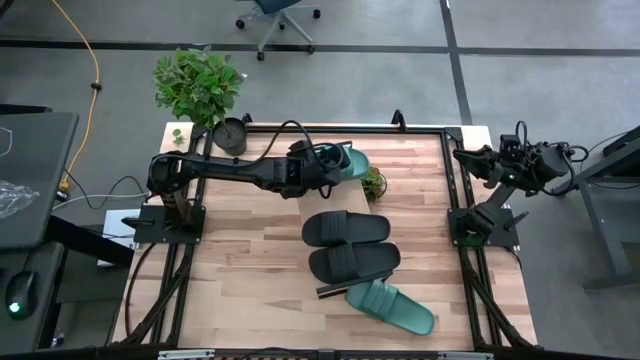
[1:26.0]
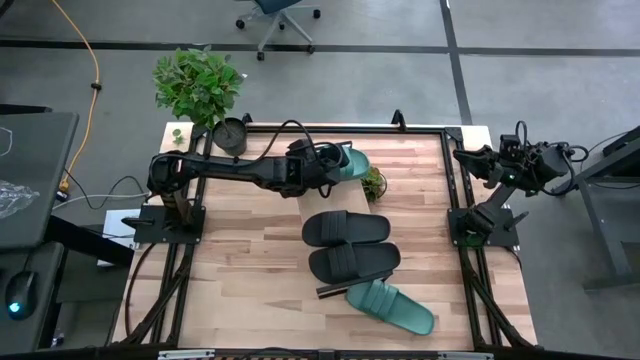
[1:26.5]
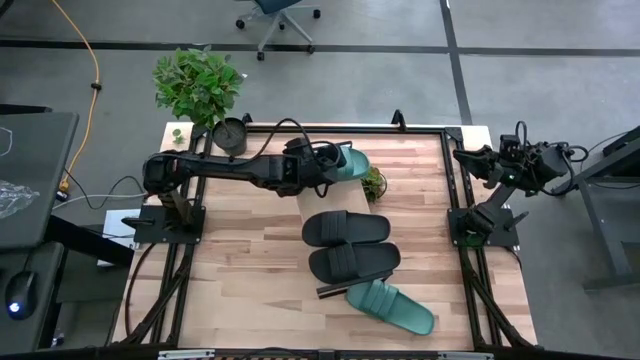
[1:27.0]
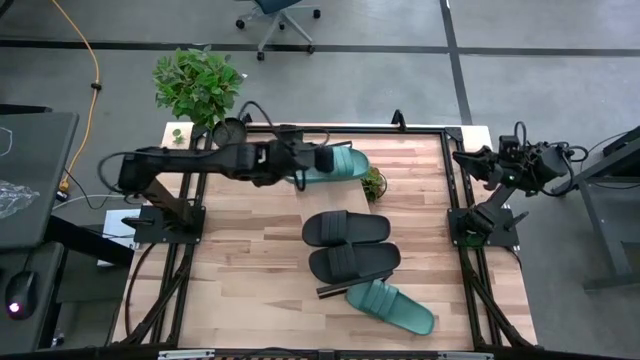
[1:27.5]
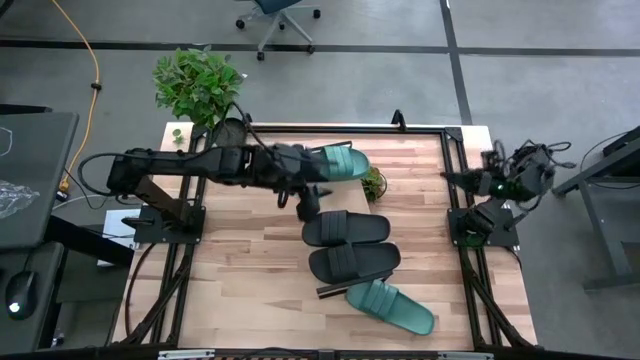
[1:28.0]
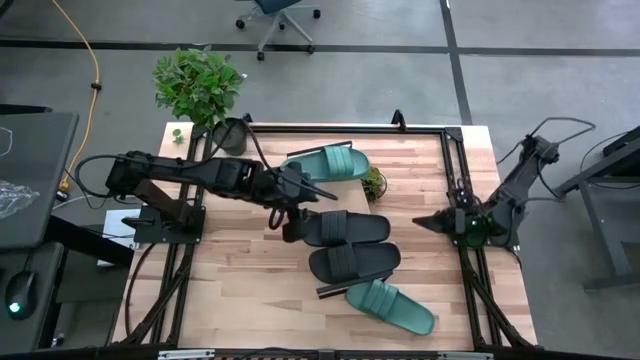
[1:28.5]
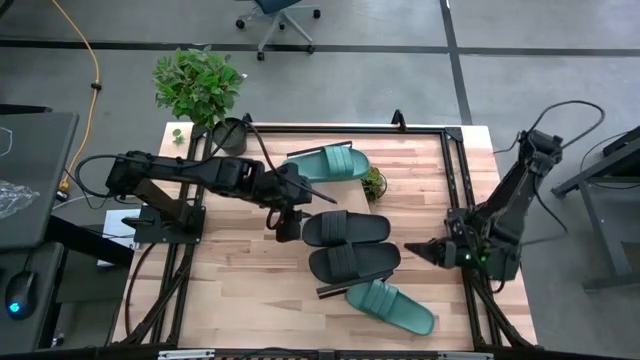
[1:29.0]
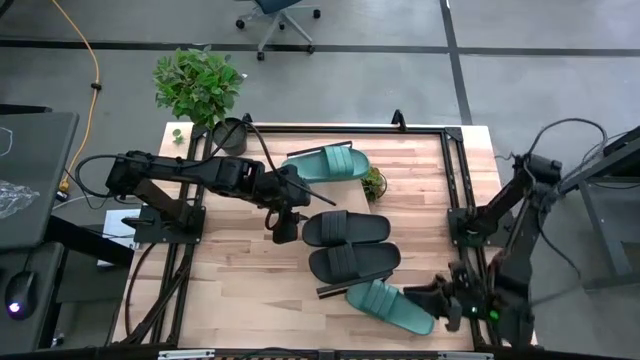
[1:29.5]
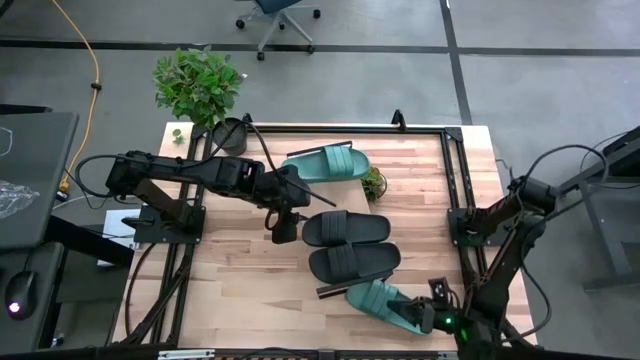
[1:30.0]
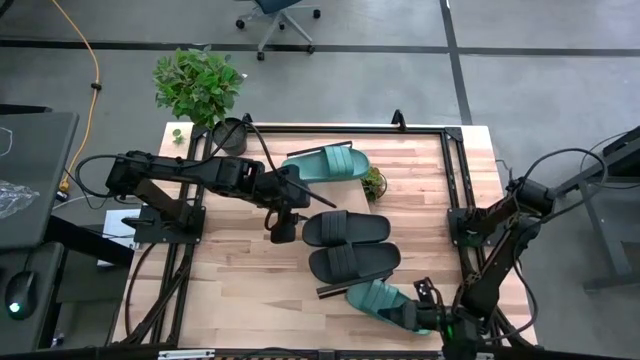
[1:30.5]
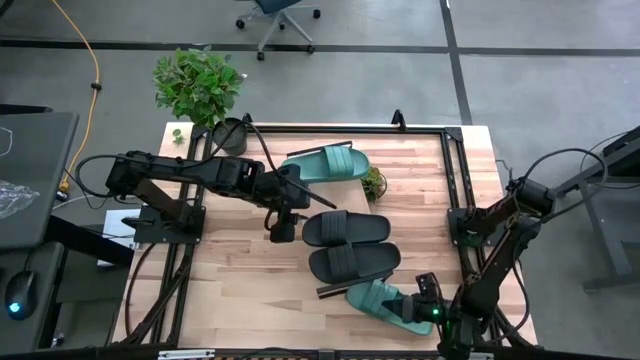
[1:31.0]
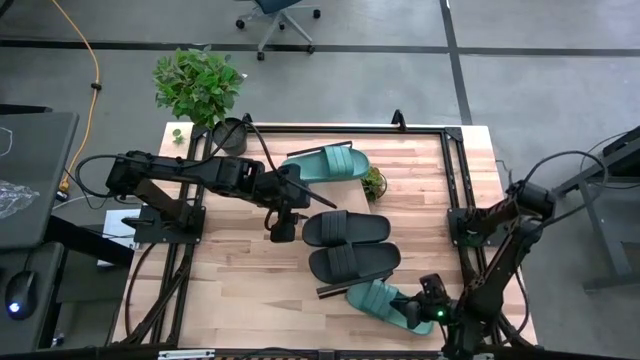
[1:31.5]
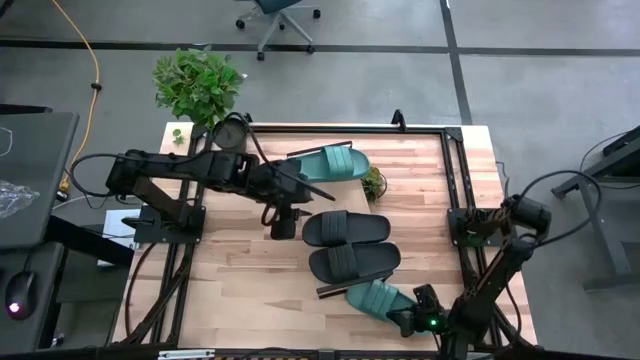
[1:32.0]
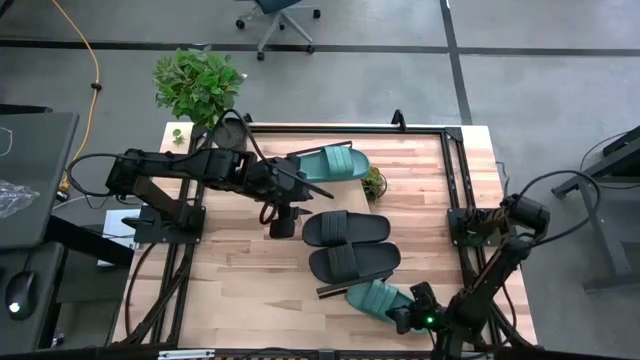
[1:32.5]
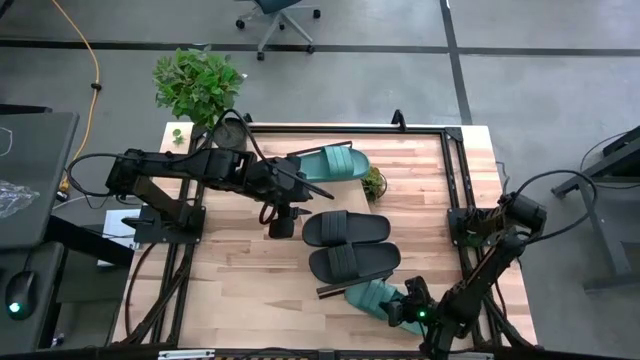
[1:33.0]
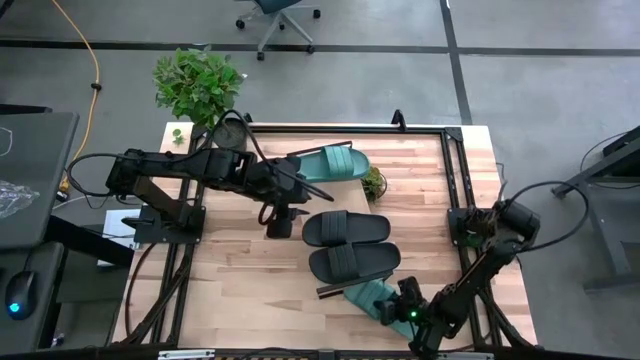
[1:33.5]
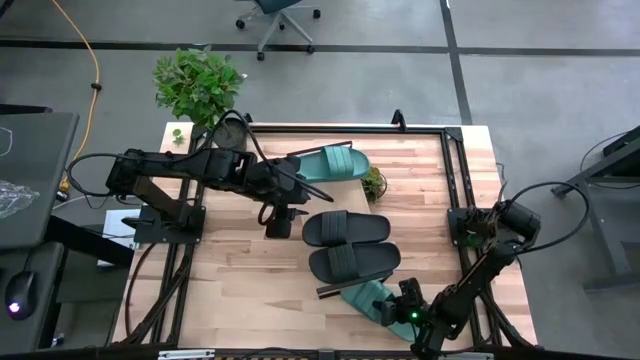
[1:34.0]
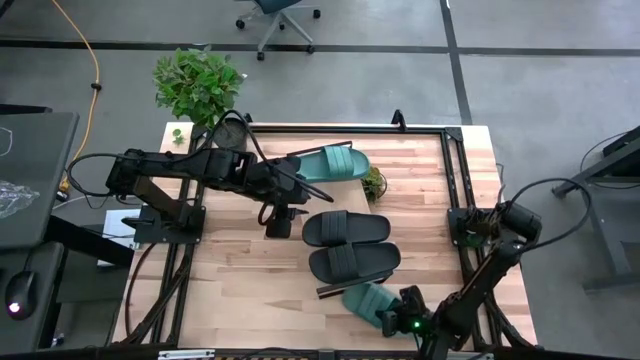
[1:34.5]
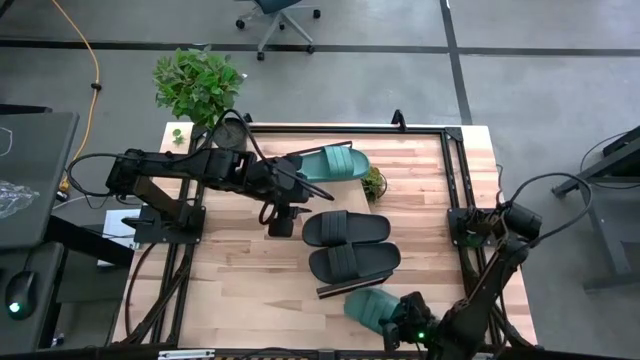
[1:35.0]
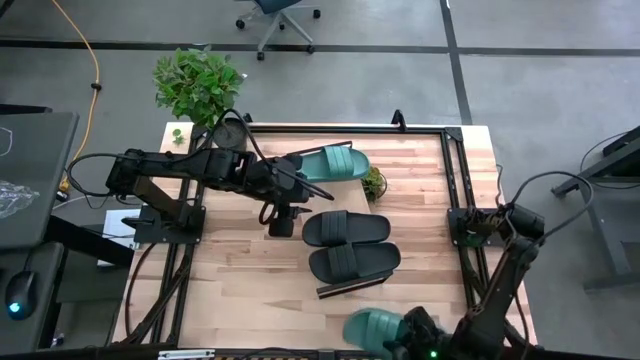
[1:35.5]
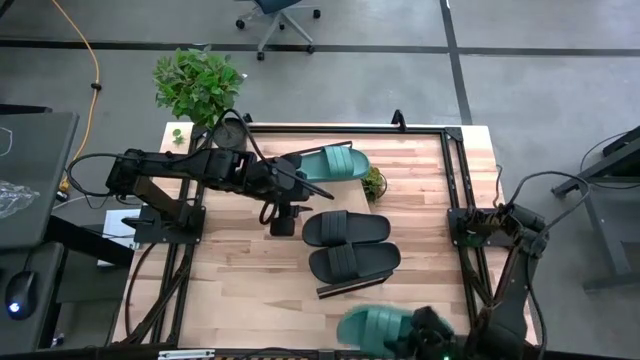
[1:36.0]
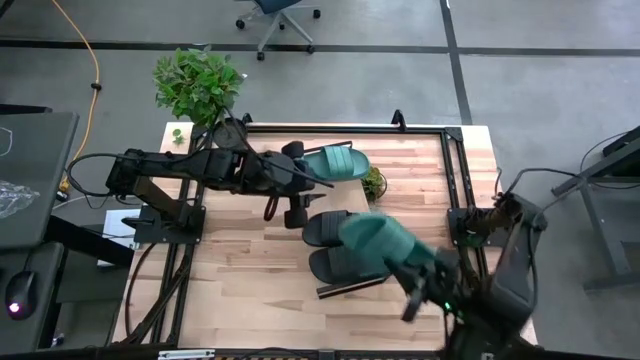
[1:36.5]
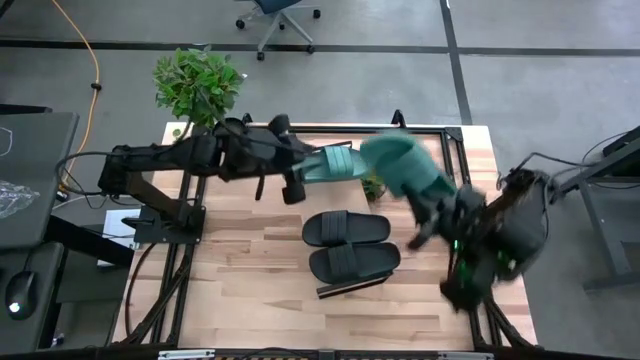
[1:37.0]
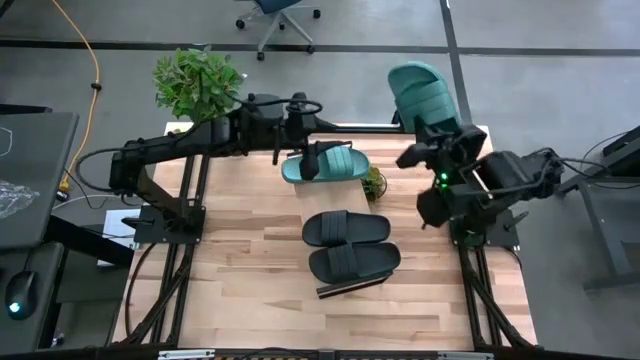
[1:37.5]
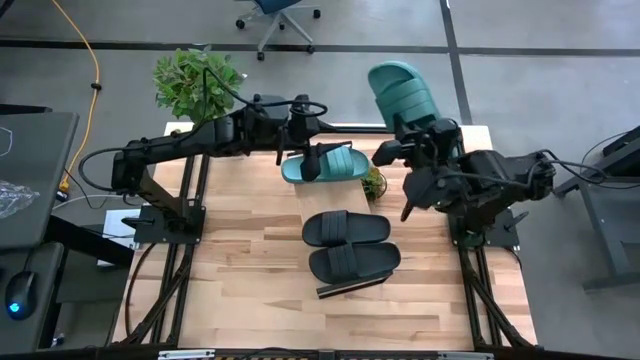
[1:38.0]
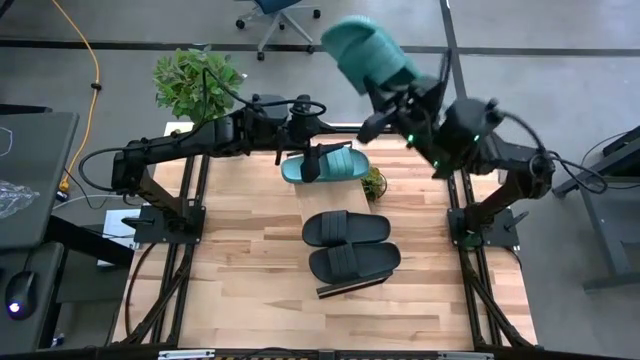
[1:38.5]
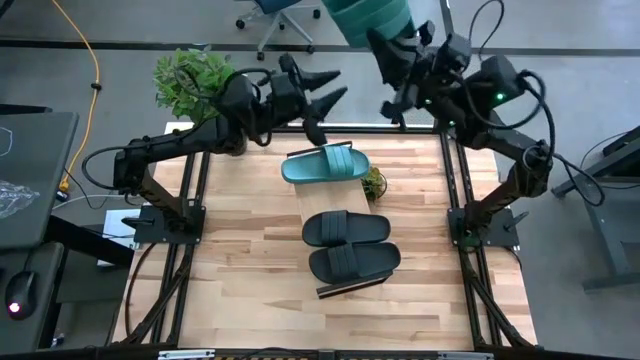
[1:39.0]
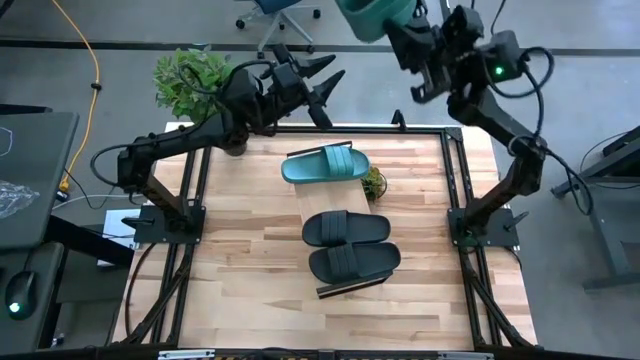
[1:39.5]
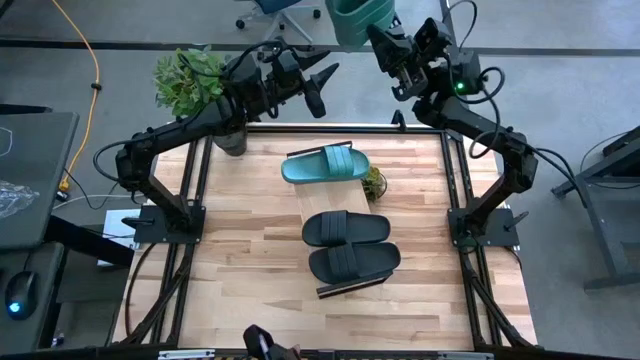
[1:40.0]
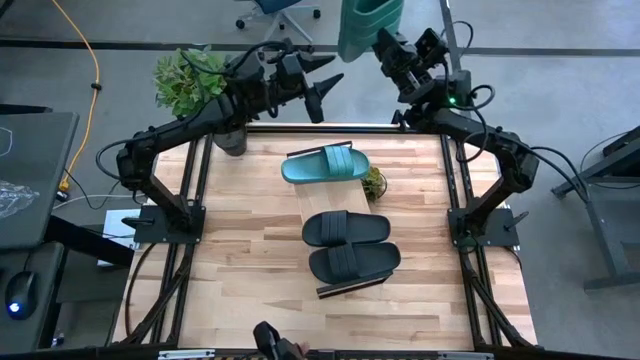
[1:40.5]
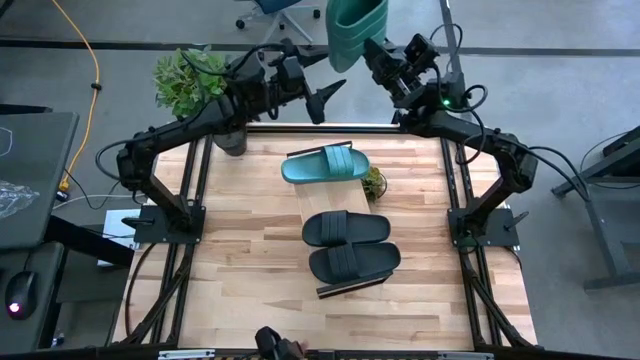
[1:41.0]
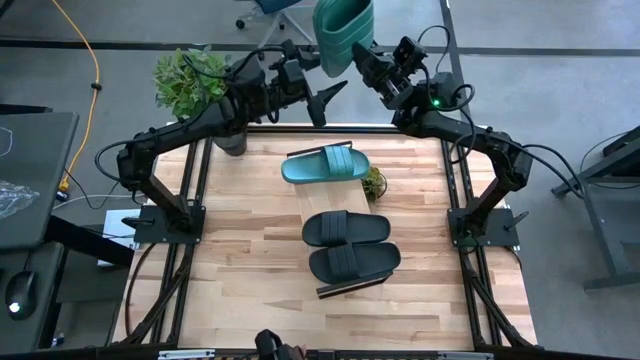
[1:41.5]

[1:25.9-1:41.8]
Task: Pick and place slides into the shelf
Put the green slipper on the shelf

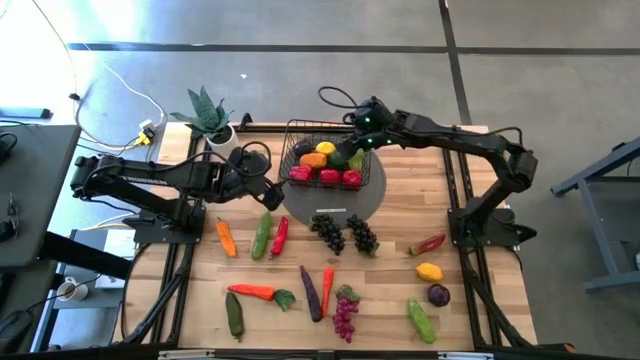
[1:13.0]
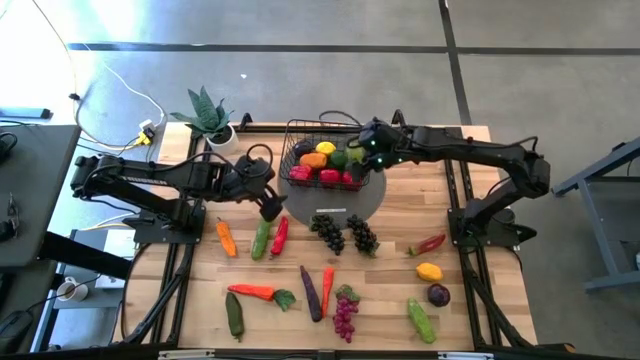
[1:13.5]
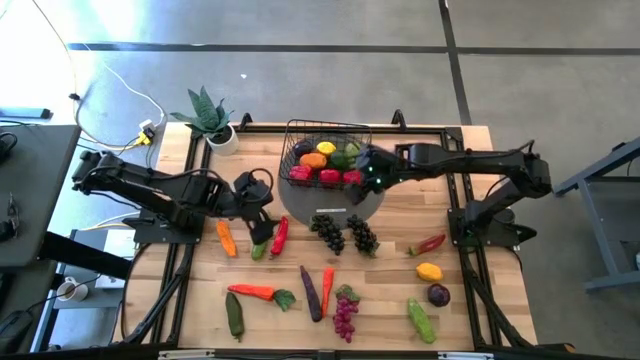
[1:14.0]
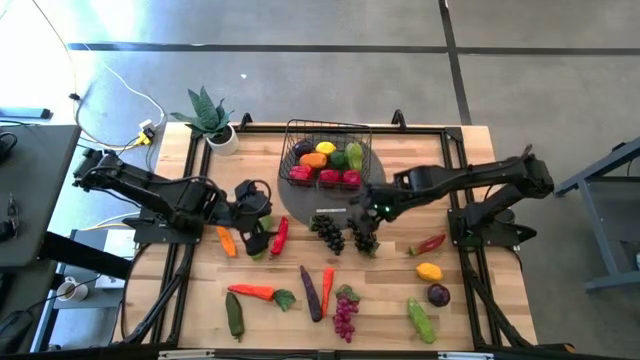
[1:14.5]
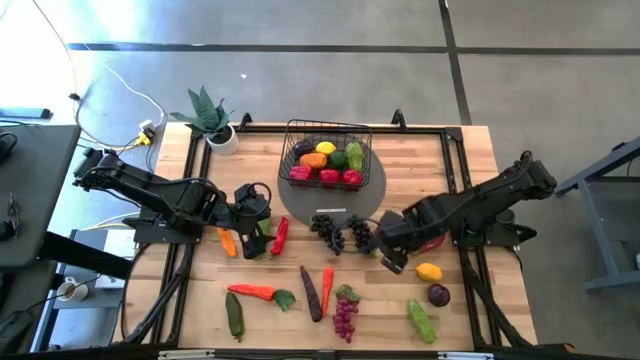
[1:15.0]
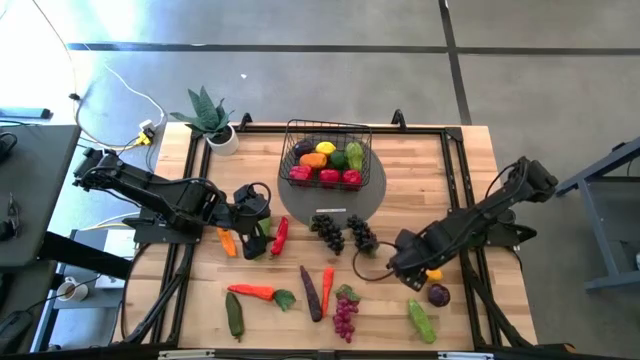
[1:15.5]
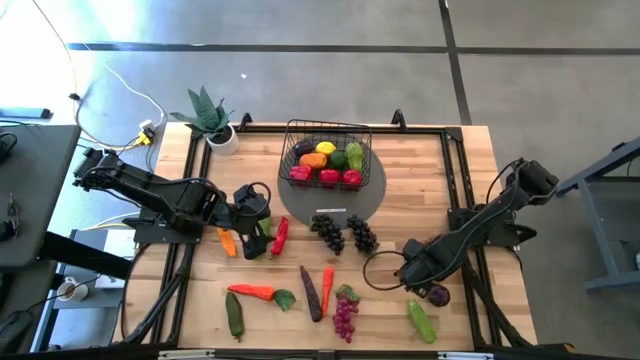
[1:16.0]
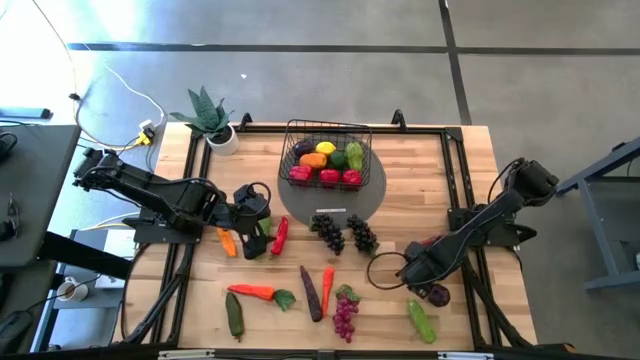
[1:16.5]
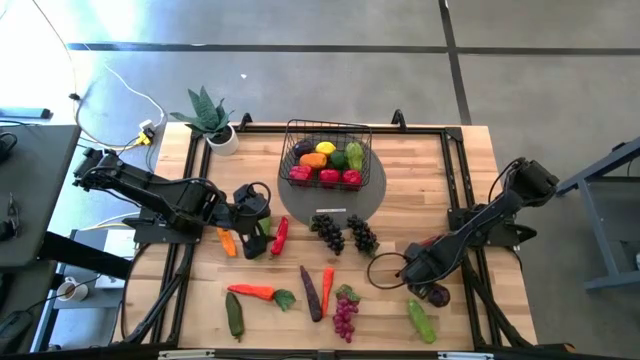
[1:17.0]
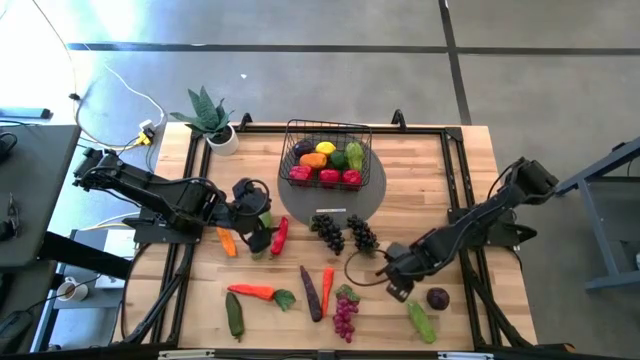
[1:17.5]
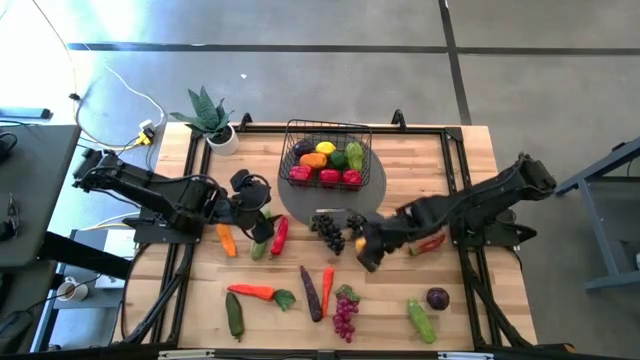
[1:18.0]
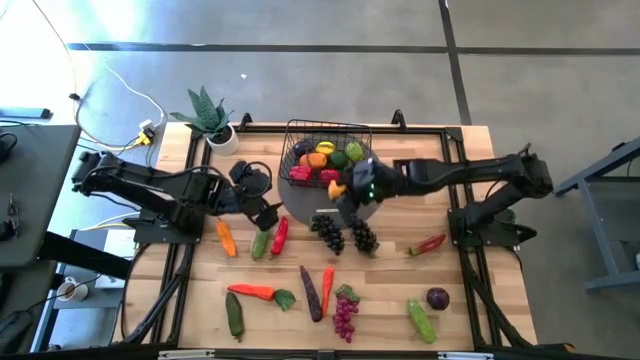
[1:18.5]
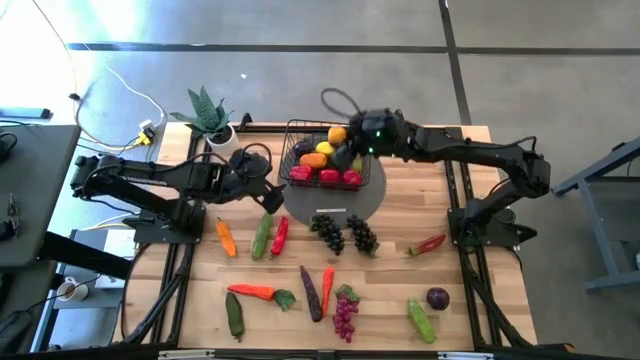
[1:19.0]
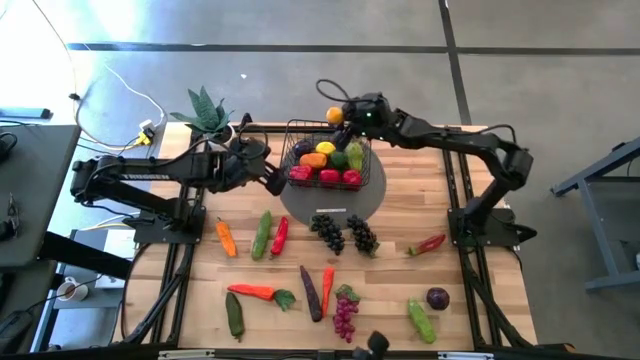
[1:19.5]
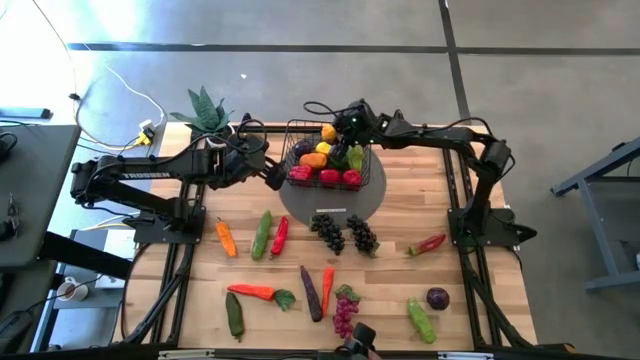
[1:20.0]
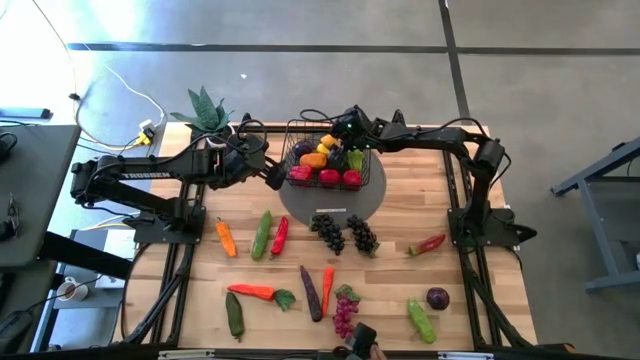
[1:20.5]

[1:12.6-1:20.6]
Task: Build produce basket
Put the yellow lemon into the wire basket
